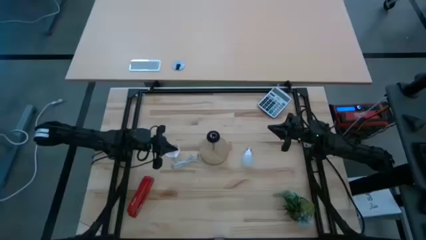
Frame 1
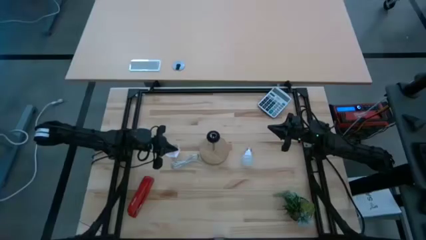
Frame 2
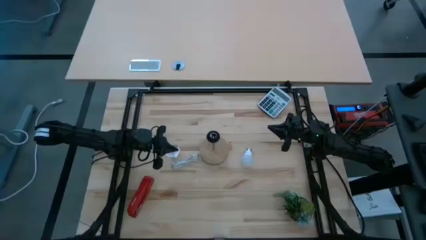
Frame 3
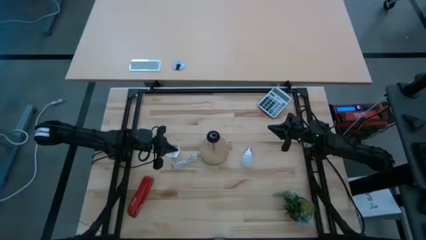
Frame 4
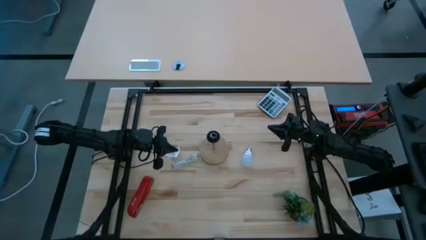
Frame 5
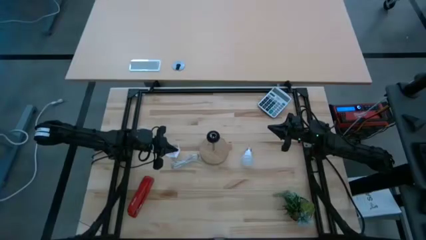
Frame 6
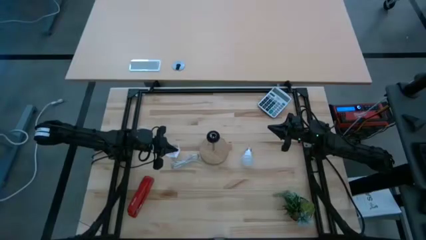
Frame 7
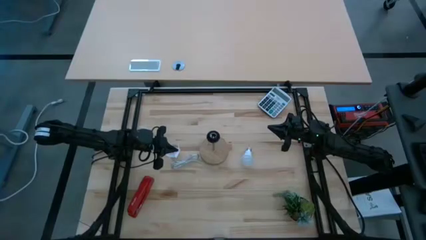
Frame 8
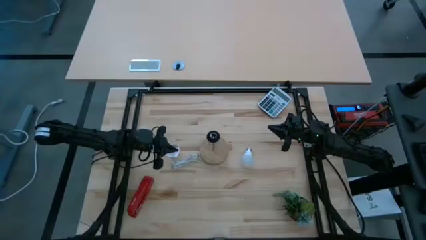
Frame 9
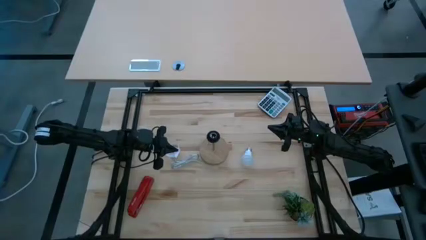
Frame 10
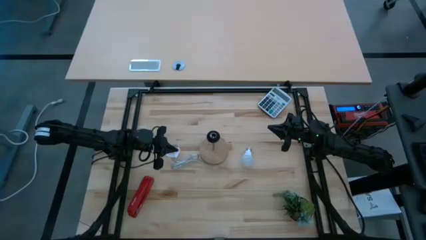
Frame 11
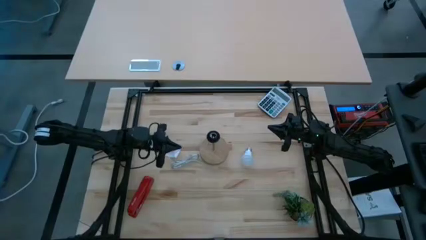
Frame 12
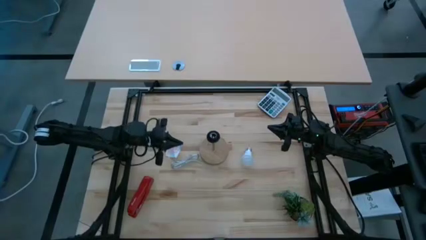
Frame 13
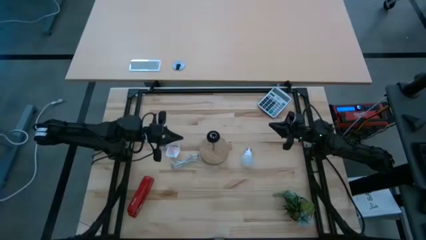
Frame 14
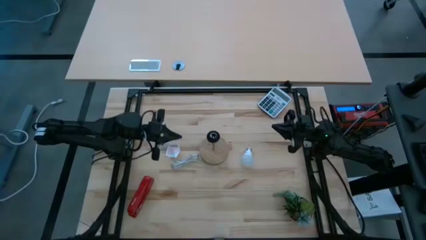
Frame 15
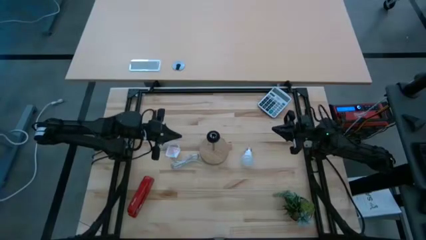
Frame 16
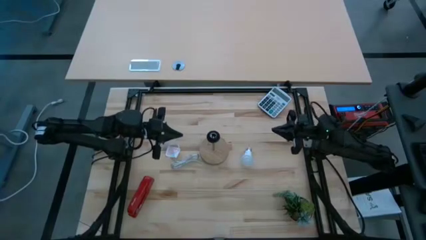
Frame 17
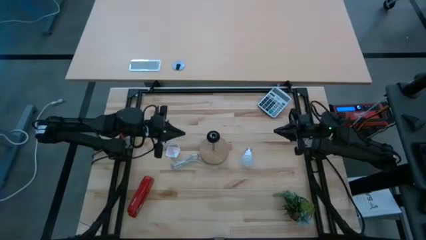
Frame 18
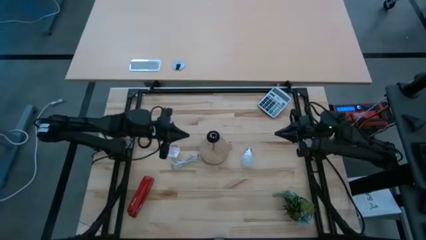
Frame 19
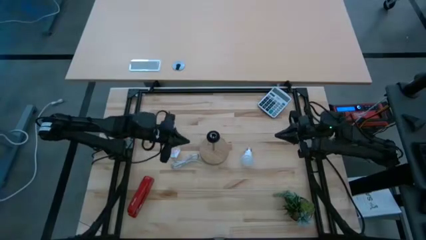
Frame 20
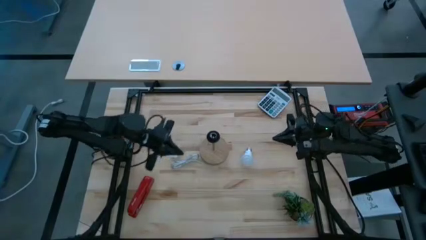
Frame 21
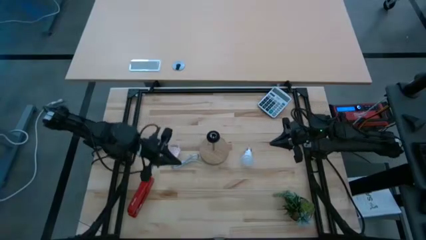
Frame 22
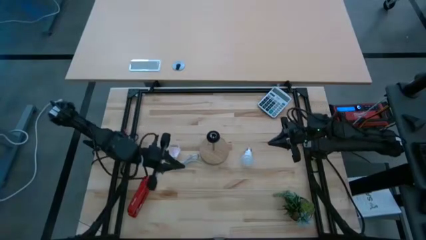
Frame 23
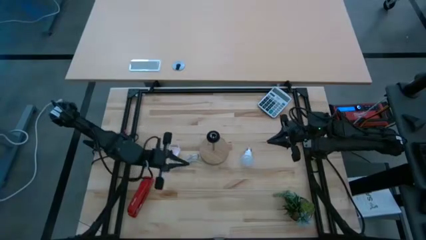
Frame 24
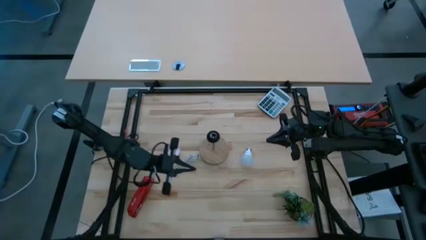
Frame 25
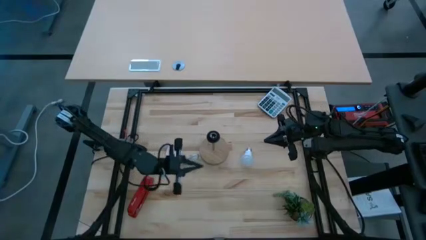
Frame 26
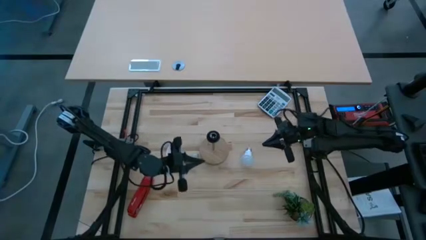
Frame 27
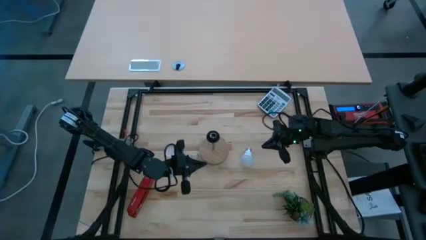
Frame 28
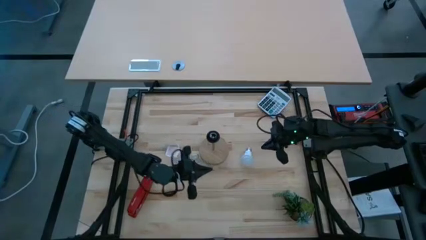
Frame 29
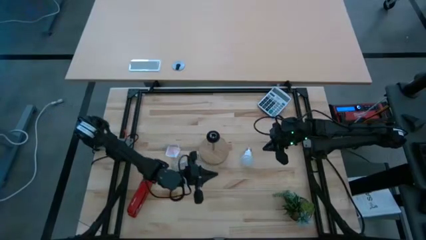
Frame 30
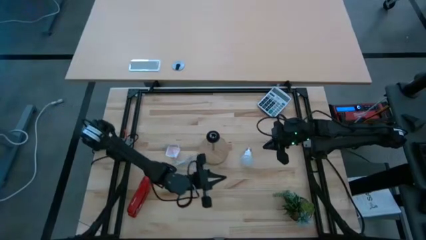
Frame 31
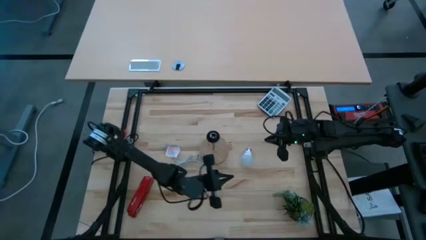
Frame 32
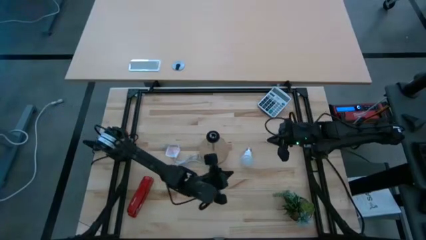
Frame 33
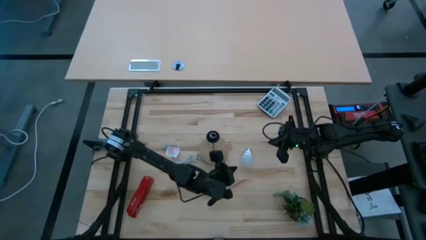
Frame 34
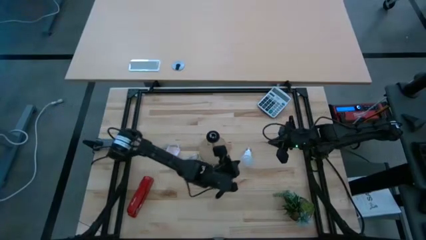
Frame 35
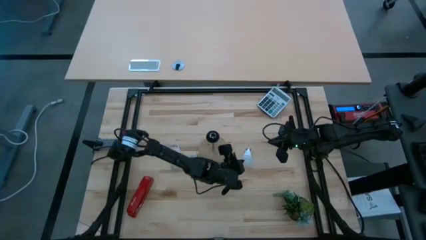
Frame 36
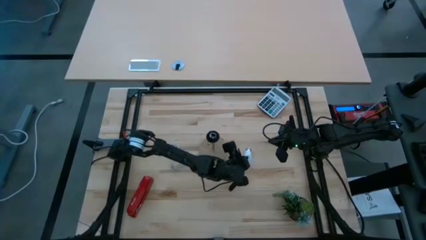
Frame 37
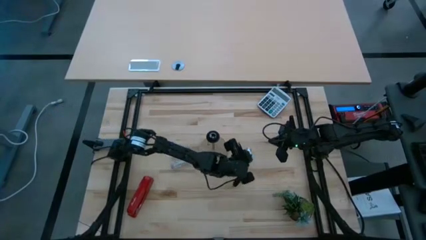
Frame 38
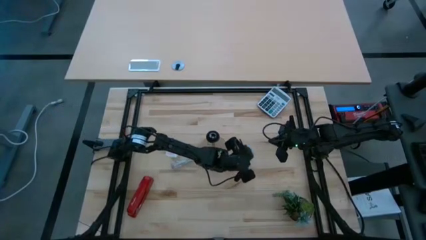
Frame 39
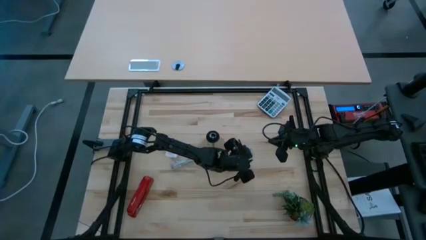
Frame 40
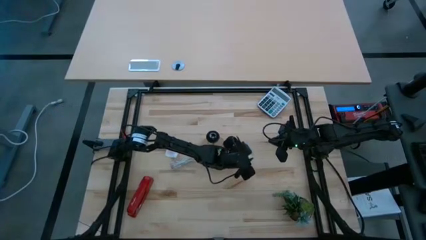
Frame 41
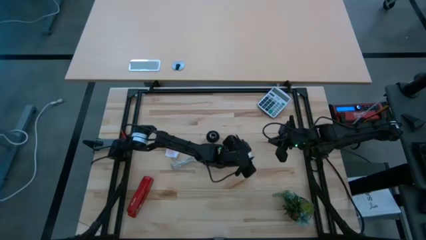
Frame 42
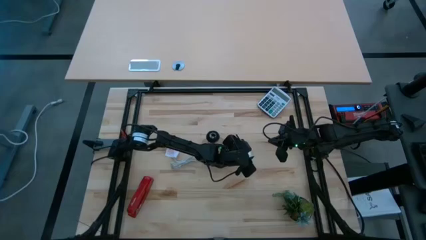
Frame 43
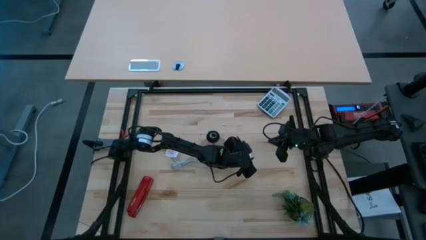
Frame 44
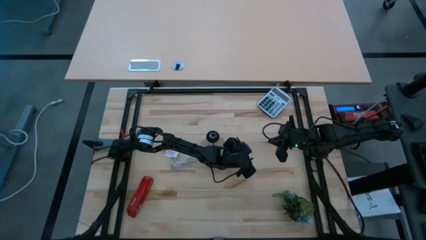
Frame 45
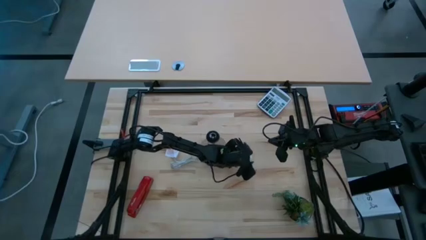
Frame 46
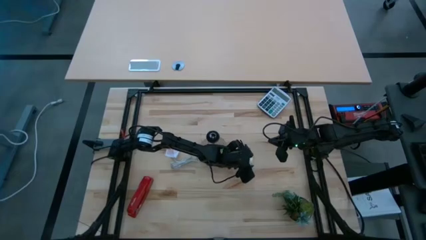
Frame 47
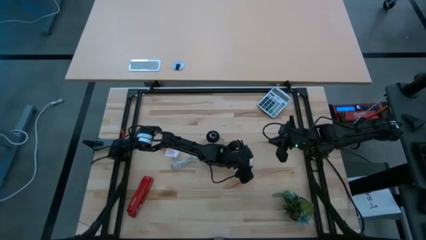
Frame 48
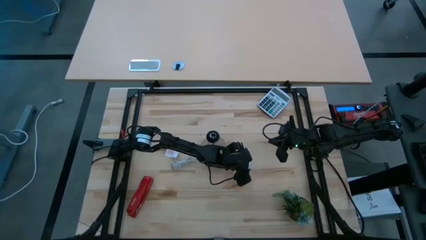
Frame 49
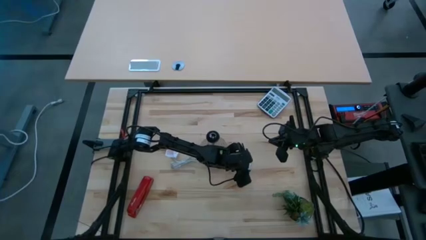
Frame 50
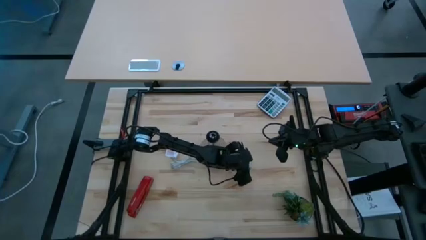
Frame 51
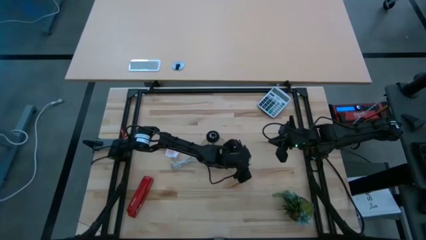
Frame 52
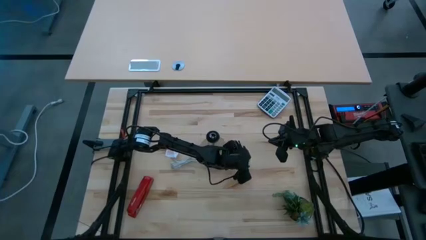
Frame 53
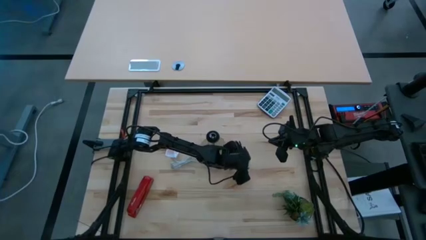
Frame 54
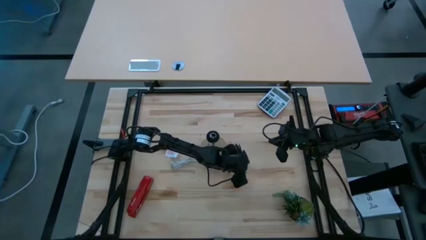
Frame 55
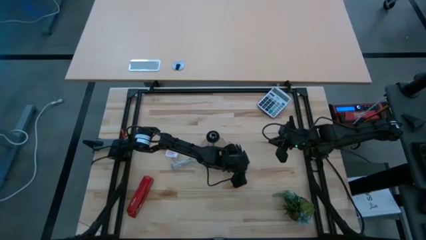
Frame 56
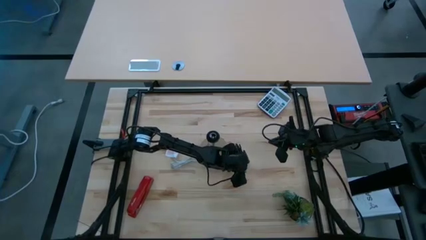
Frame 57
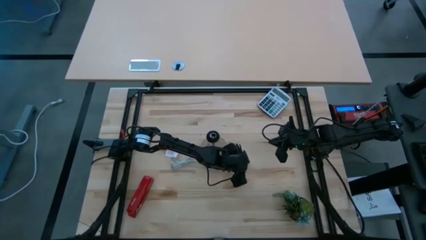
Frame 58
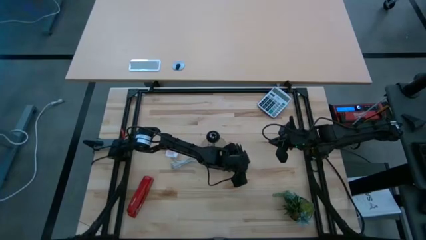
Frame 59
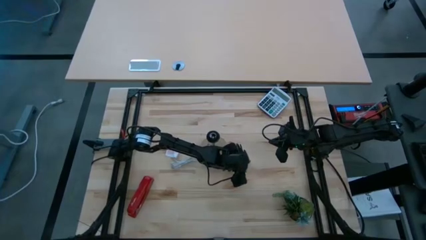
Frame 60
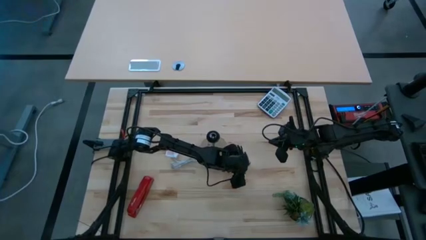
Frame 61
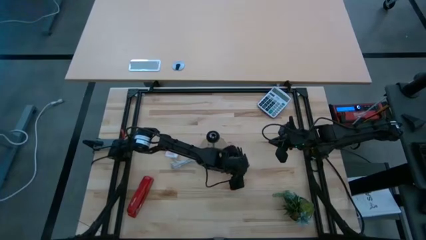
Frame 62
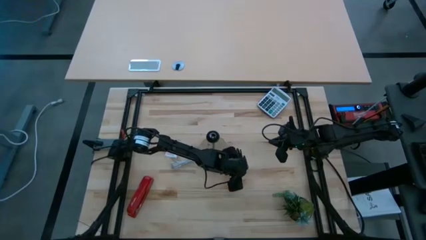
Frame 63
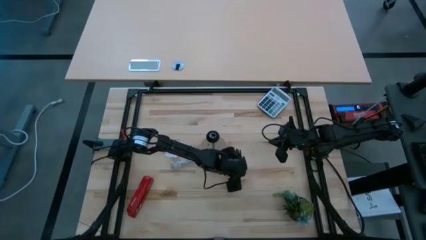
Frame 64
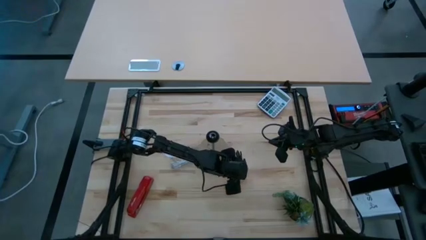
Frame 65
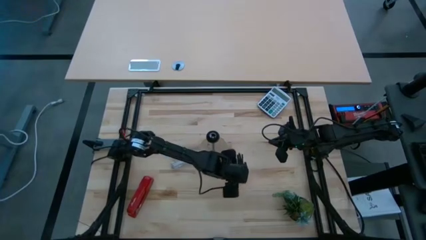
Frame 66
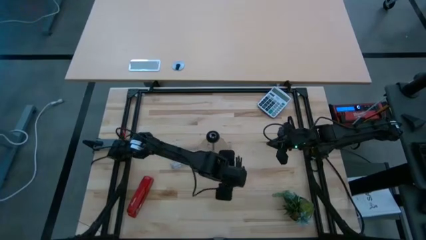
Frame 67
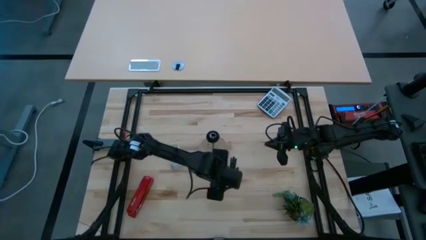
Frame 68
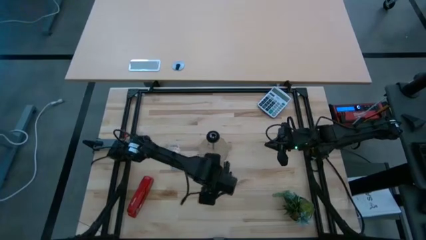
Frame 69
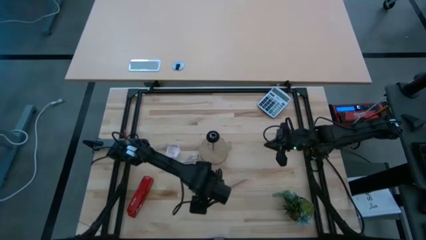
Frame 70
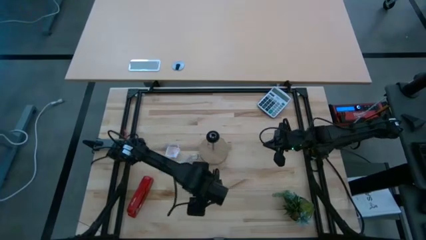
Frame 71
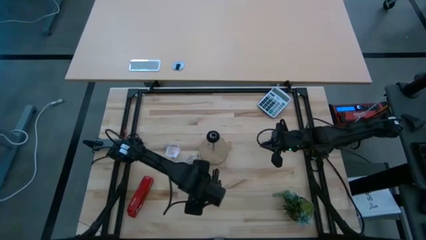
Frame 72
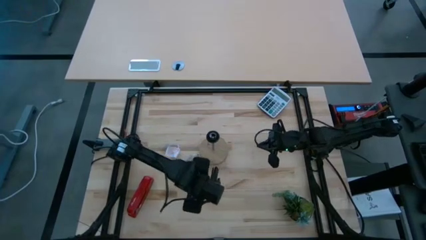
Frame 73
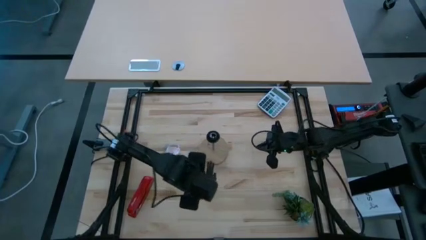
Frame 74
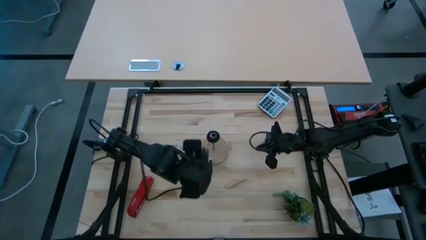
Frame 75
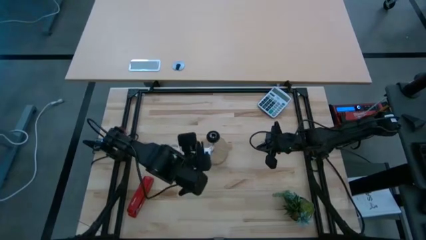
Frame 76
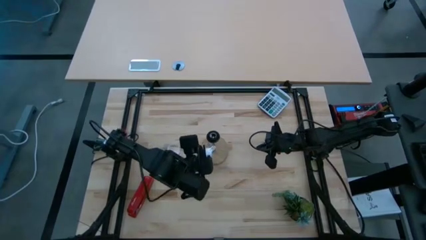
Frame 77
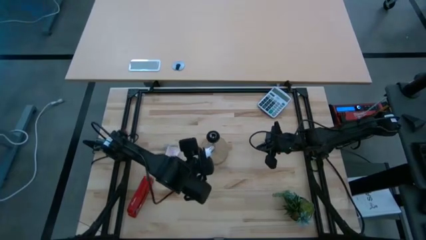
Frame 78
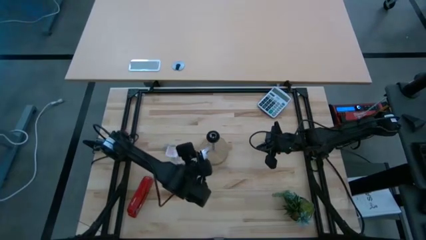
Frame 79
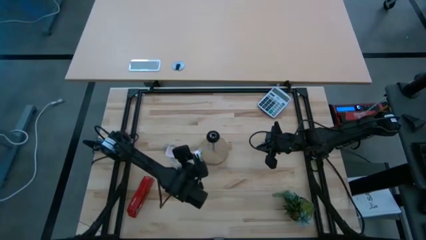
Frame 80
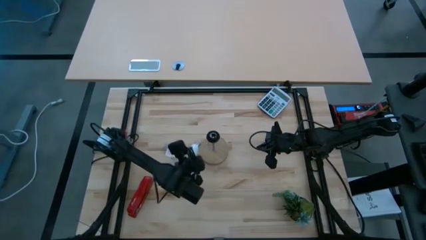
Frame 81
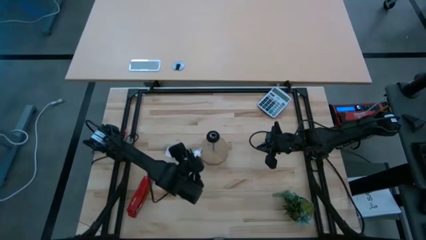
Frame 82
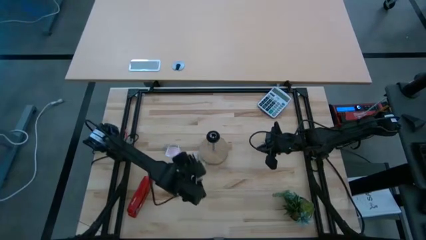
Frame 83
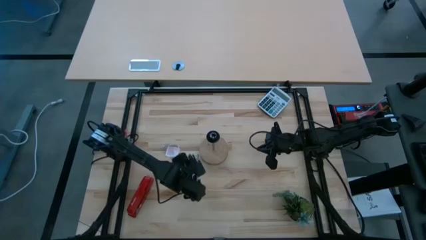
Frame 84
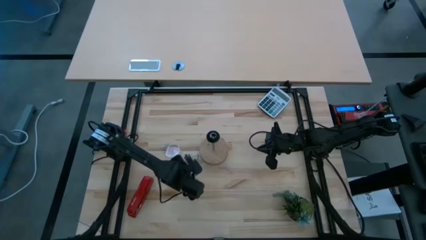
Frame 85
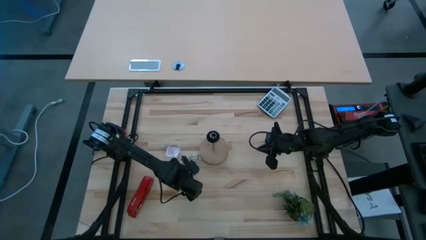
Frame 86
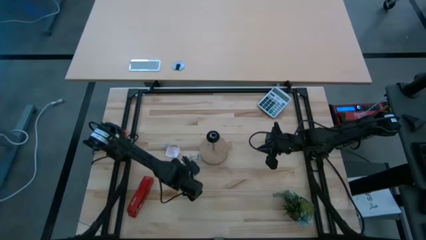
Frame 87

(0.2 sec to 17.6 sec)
Task: Screw lightbulb
Insert the lightbulb into the brown lamp
